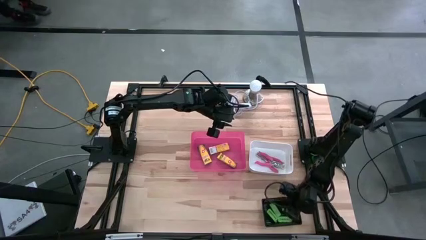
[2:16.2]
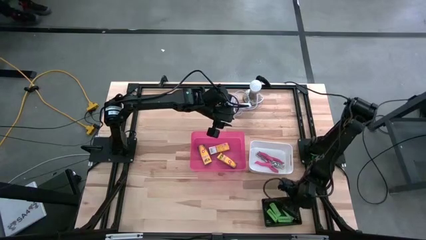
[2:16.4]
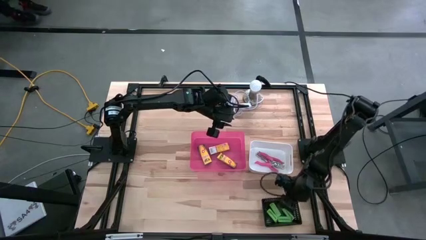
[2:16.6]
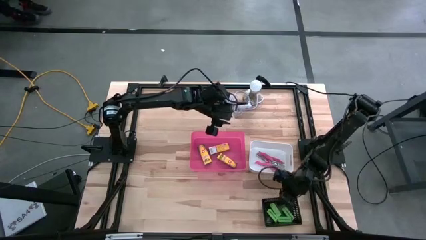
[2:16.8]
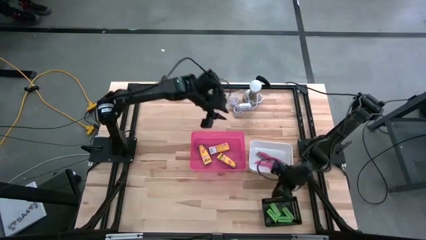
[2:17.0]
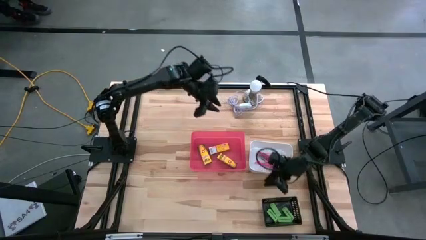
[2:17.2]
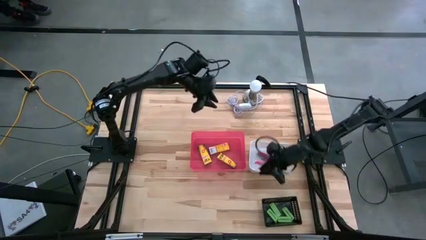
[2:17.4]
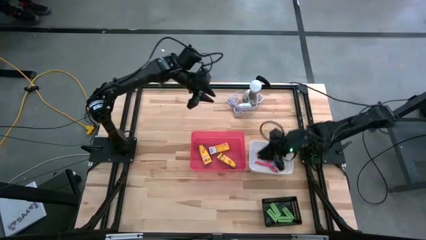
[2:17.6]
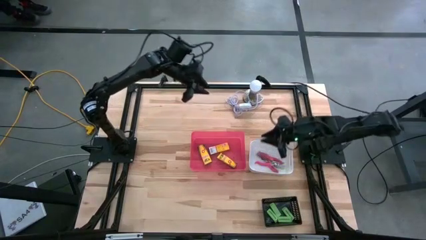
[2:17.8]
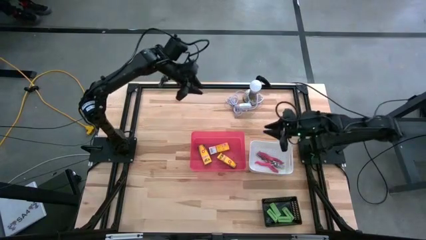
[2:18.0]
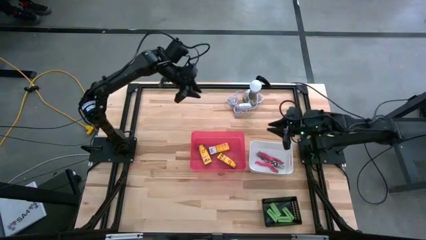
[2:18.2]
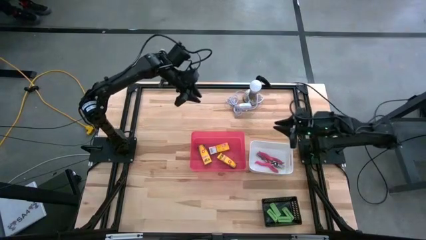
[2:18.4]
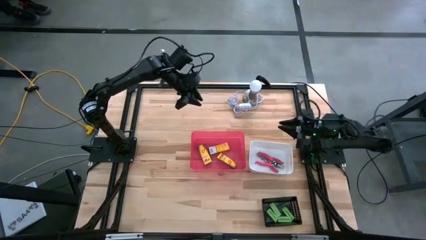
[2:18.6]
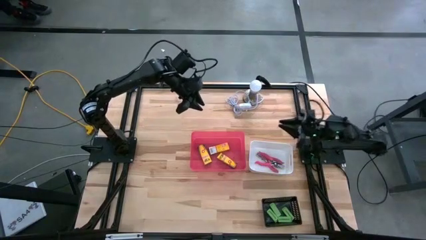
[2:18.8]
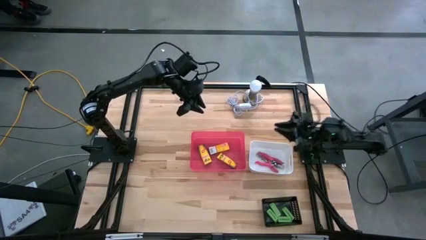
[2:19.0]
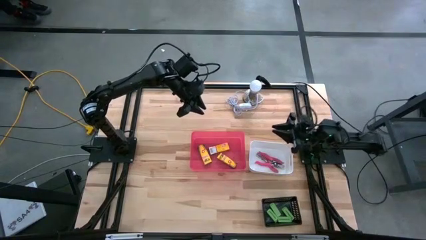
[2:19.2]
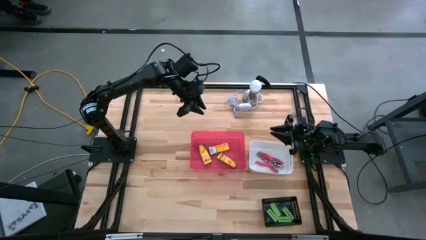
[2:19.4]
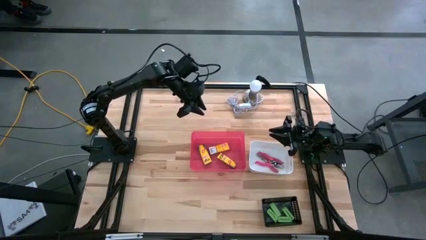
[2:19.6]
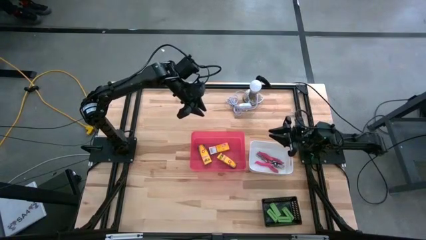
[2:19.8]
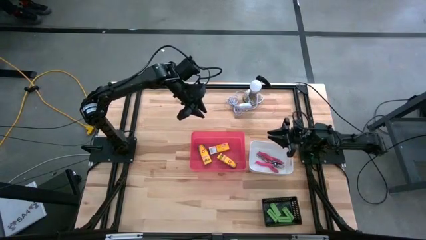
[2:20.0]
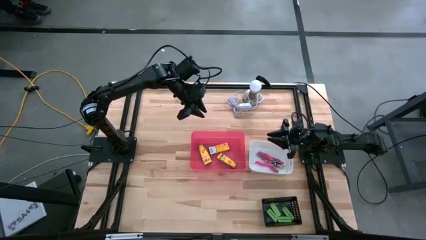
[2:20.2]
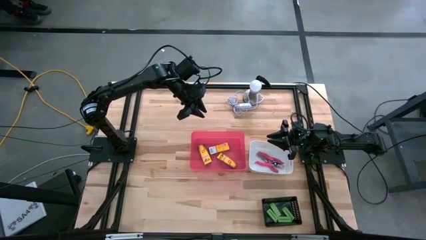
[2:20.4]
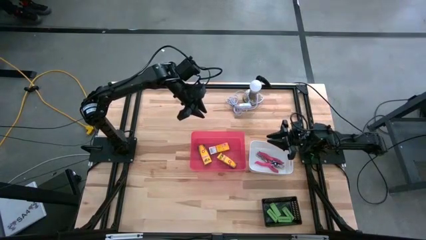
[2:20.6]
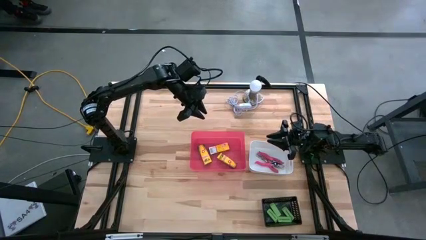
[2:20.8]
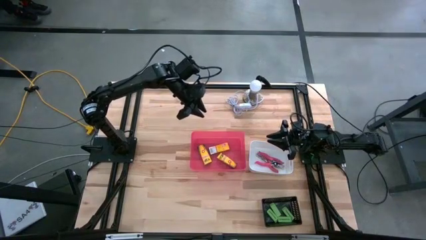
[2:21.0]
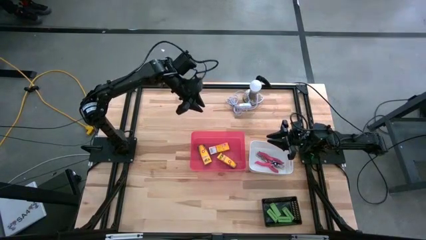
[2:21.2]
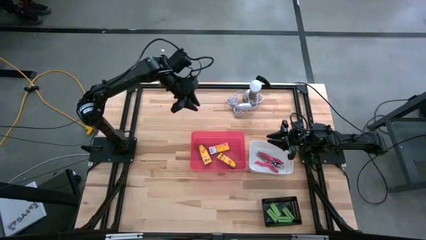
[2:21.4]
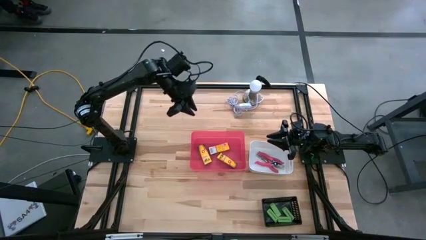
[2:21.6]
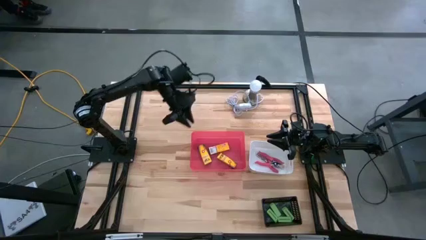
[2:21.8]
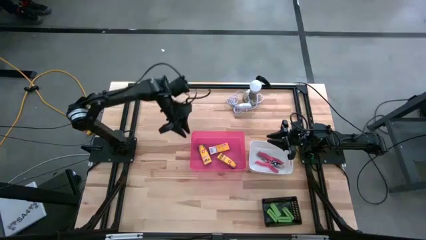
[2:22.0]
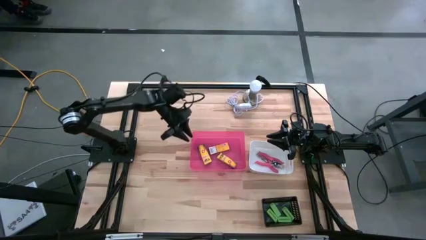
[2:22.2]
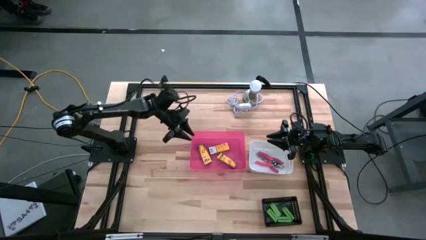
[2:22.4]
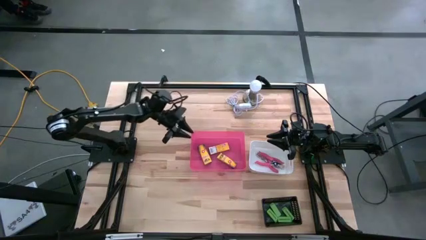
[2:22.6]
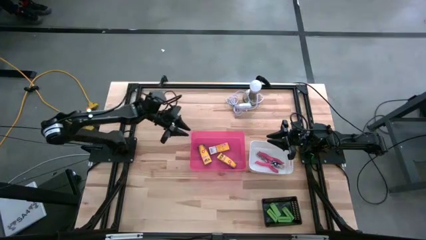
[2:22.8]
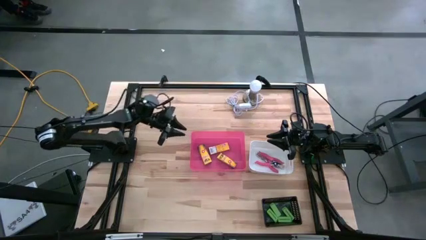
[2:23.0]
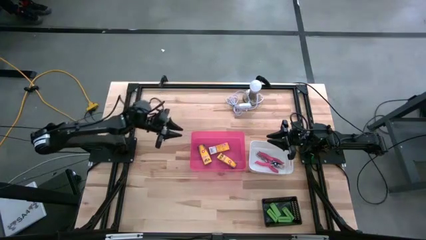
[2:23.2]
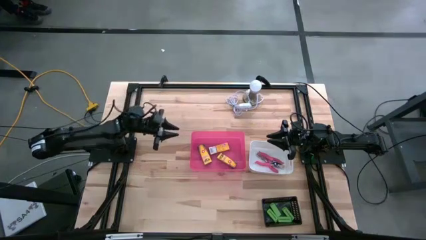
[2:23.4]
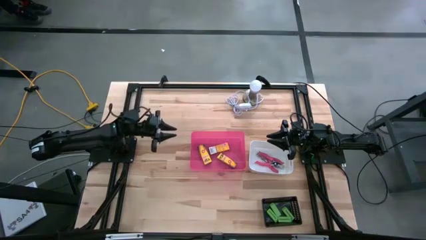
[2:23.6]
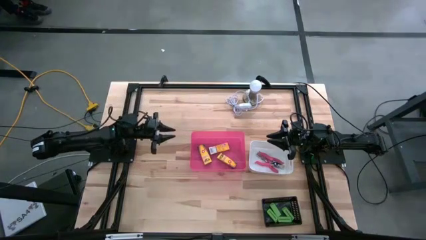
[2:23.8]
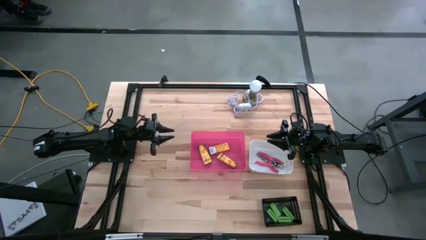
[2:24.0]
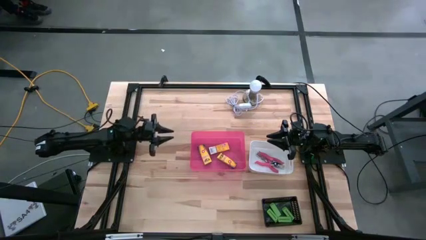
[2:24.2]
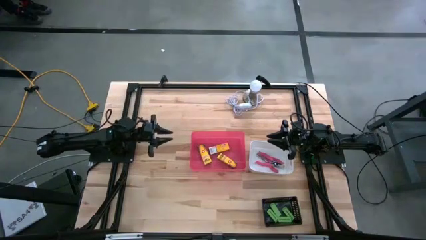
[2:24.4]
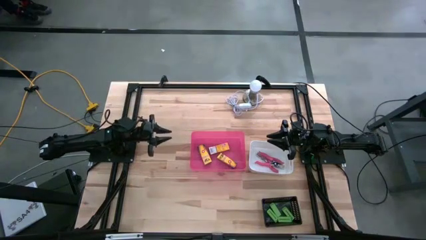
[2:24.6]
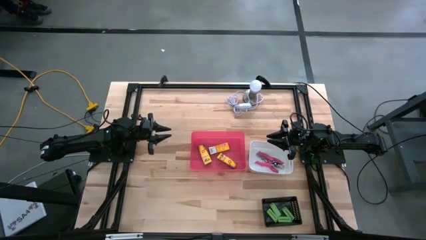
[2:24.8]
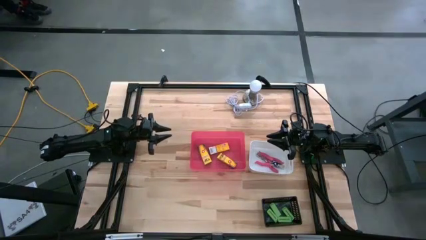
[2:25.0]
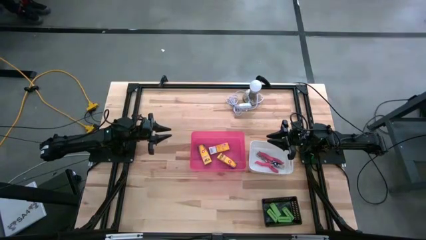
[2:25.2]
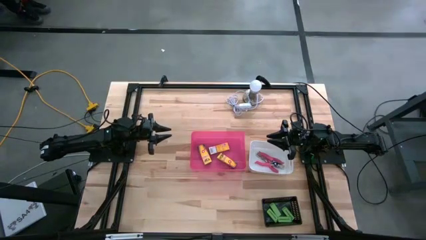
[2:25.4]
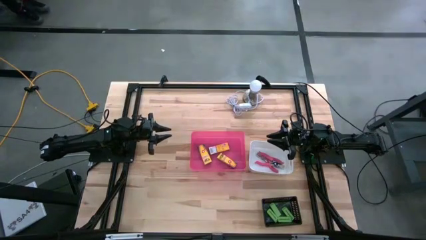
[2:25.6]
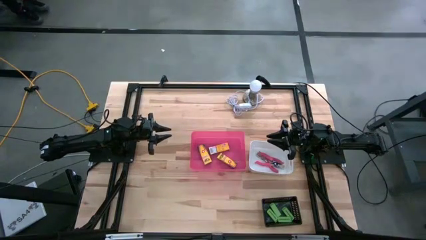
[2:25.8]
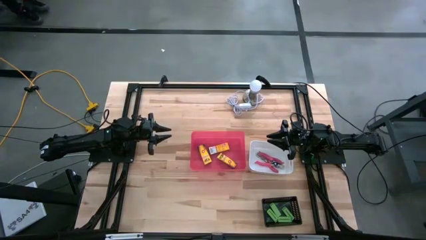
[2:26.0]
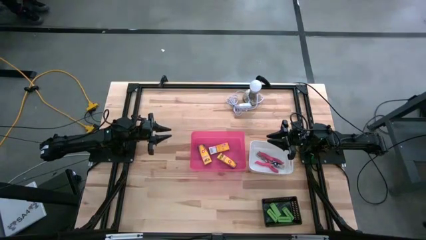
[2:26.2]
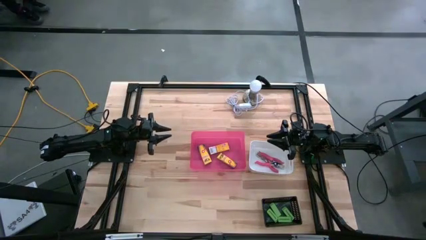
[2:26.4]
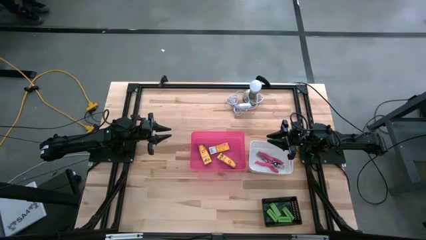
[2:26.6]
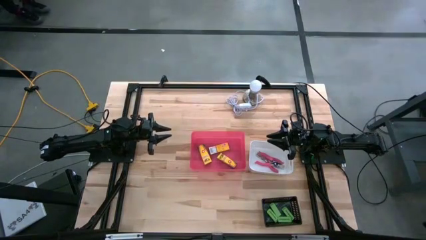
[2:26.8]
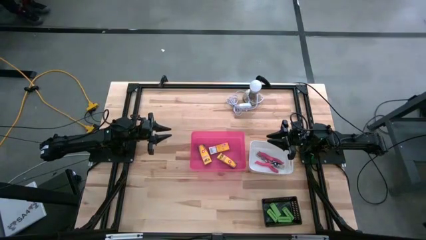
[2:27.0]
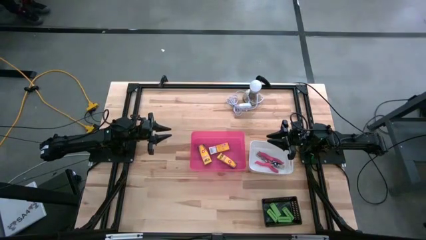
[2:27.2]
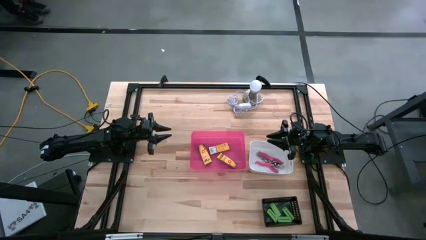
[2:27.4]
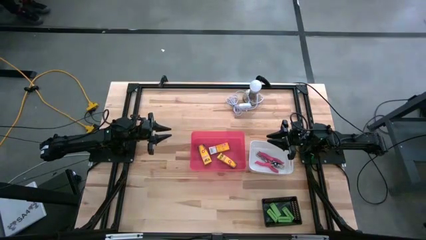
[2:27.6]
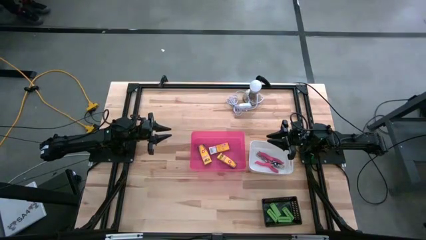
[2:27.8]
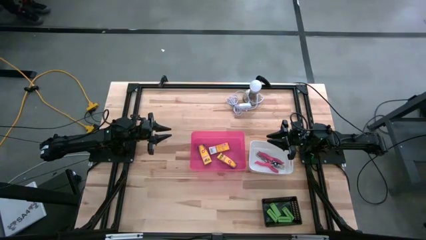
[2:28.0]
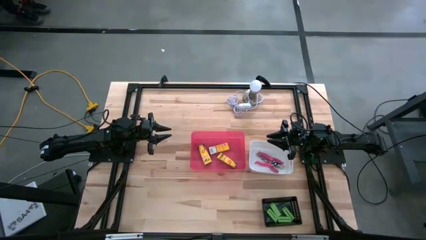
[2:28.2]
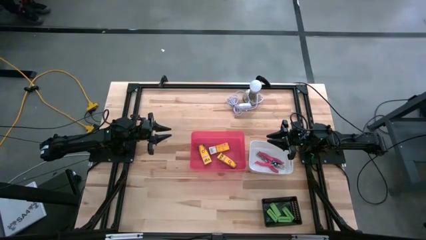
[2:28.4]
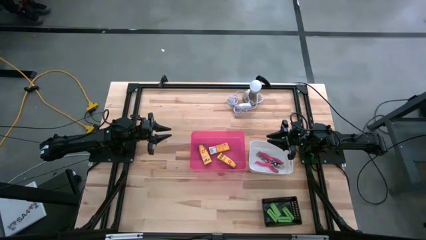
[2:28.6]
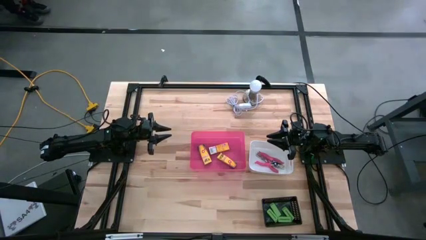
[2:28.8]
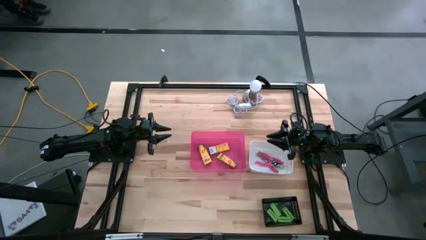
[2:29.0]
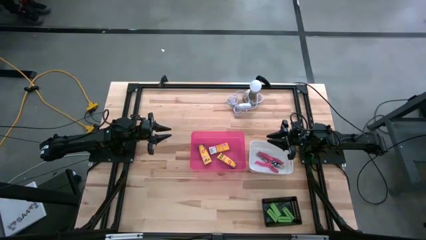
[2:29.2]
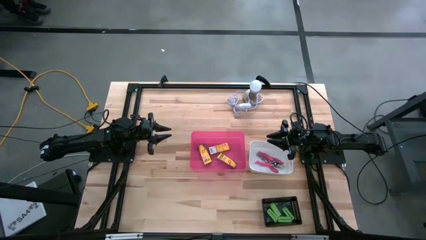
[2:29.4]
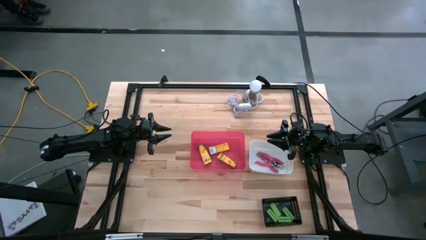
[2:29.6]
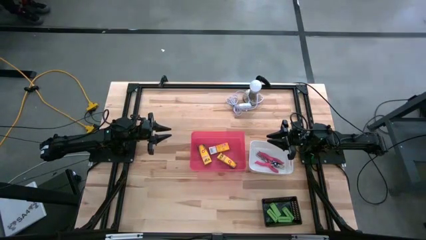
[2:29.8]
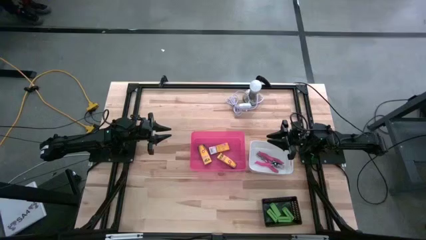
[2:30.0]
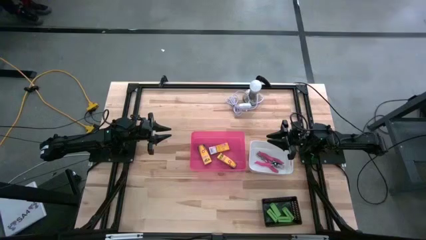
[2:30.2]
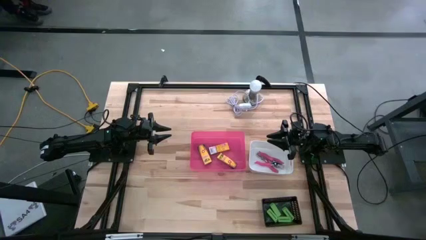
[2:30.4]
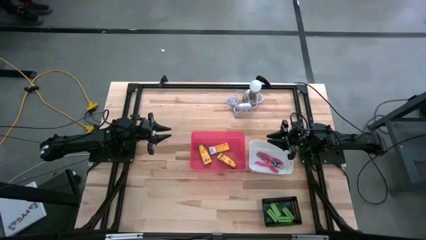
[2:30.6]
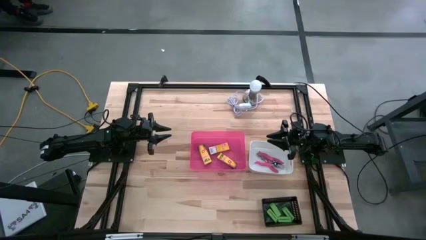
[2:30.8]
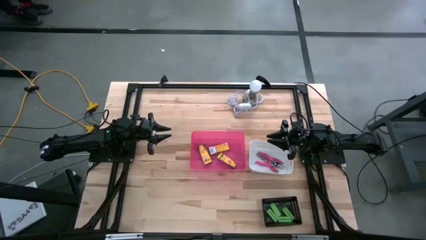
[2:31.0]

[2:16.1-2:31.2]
Task: Pick & Place School Supplies
Return to Home Position
